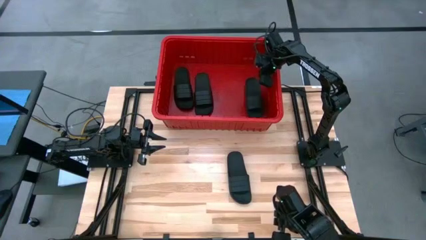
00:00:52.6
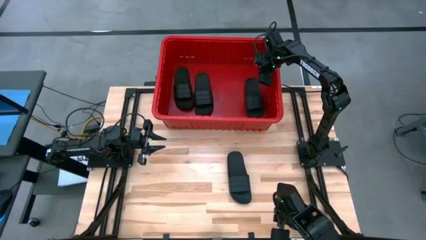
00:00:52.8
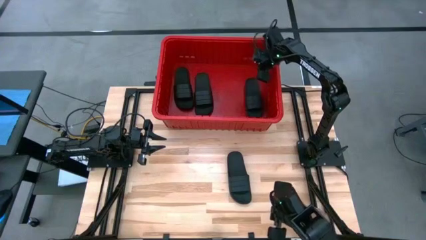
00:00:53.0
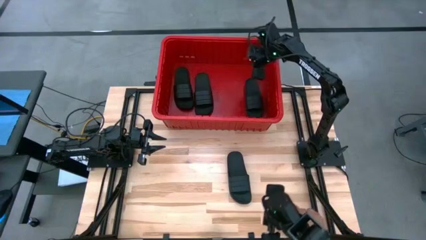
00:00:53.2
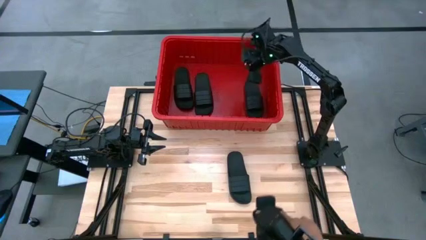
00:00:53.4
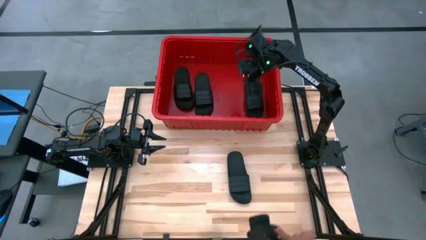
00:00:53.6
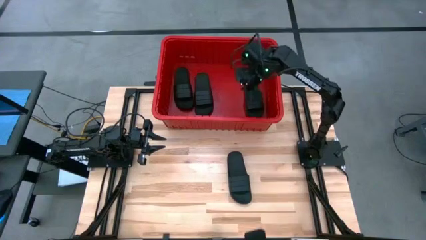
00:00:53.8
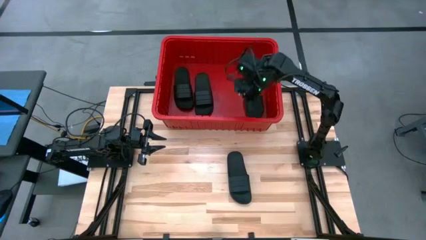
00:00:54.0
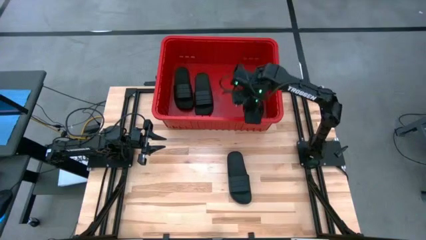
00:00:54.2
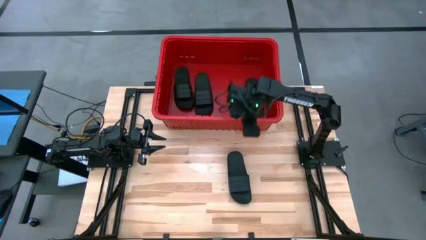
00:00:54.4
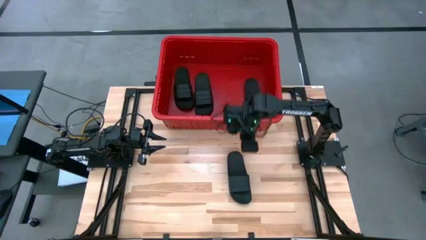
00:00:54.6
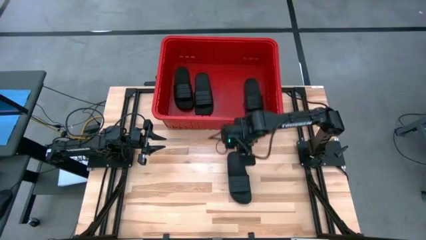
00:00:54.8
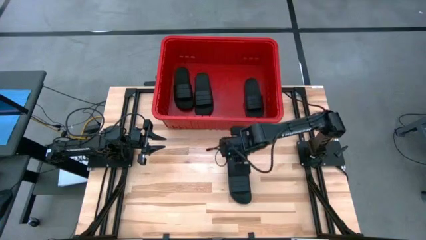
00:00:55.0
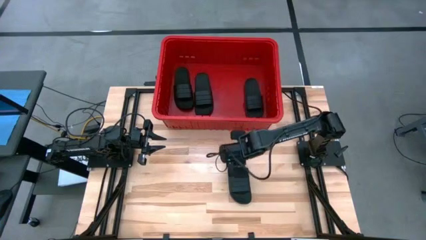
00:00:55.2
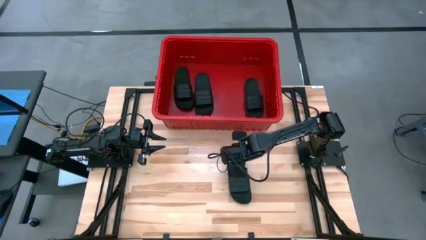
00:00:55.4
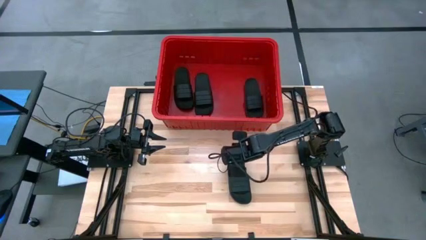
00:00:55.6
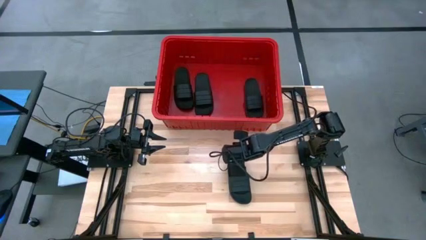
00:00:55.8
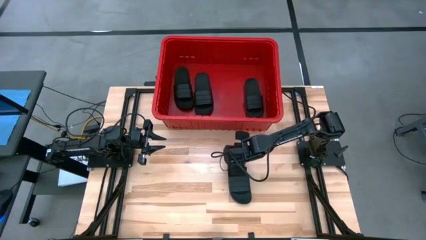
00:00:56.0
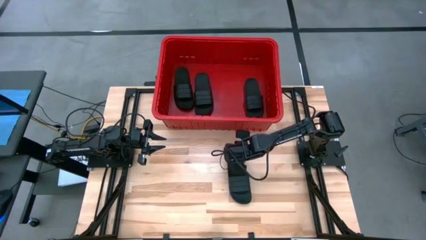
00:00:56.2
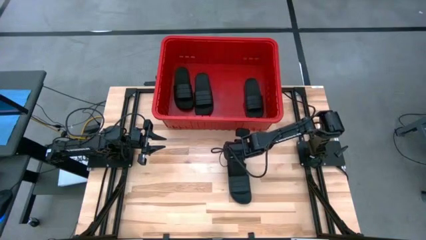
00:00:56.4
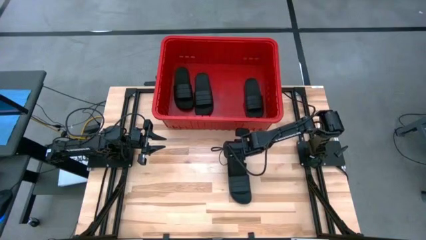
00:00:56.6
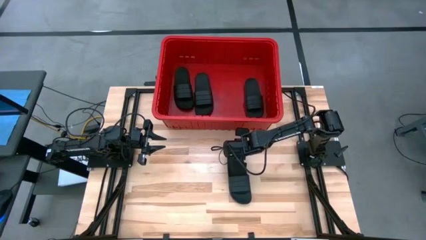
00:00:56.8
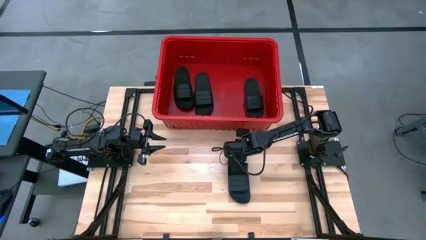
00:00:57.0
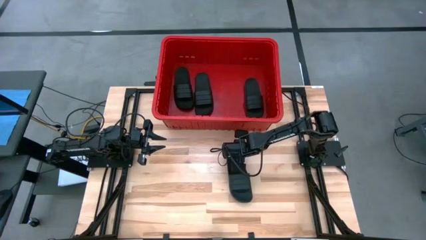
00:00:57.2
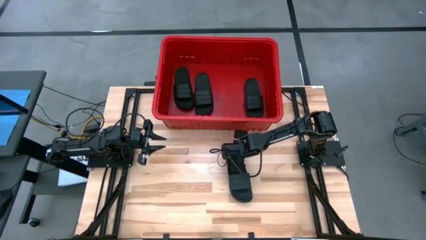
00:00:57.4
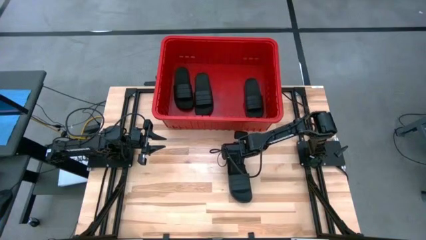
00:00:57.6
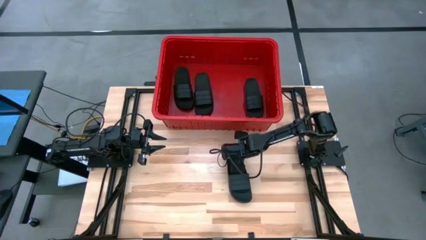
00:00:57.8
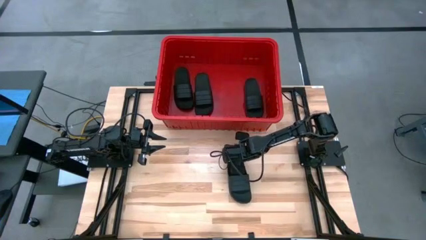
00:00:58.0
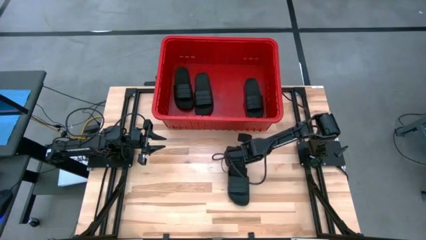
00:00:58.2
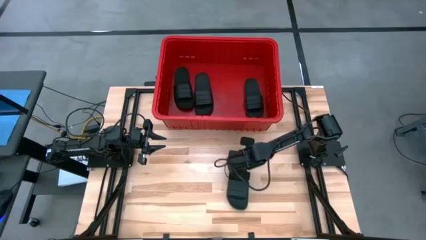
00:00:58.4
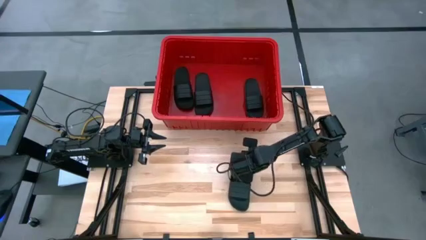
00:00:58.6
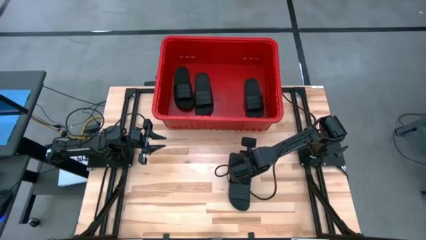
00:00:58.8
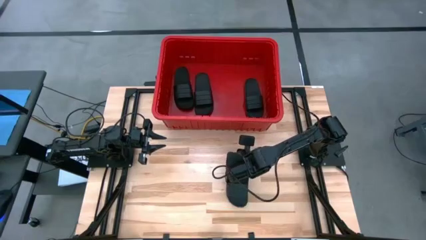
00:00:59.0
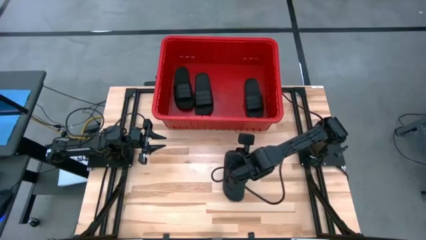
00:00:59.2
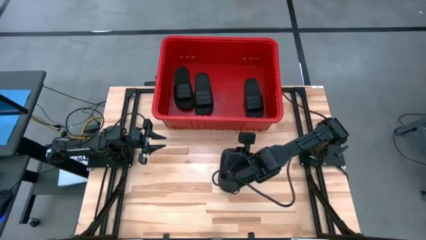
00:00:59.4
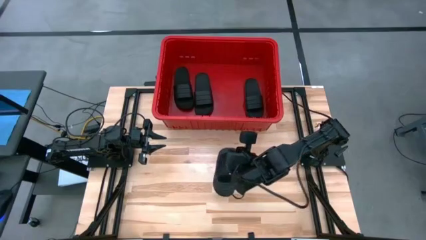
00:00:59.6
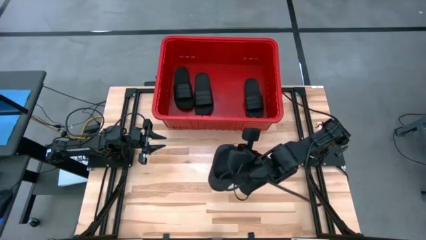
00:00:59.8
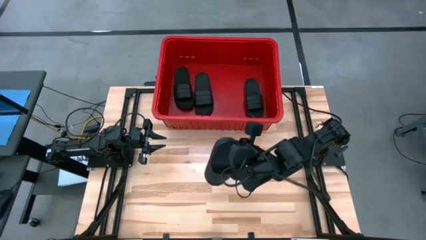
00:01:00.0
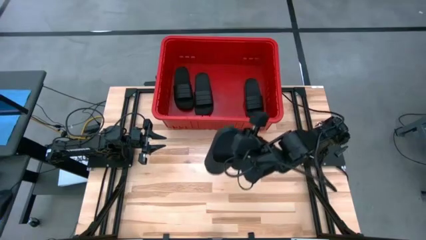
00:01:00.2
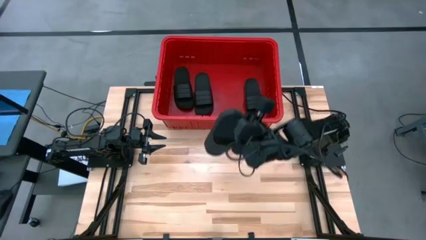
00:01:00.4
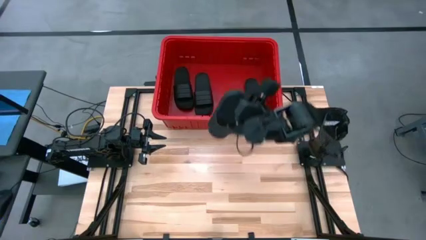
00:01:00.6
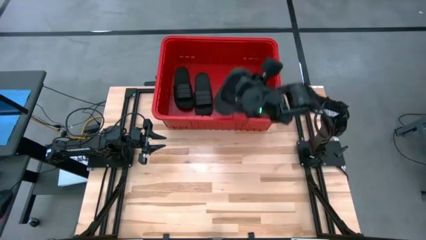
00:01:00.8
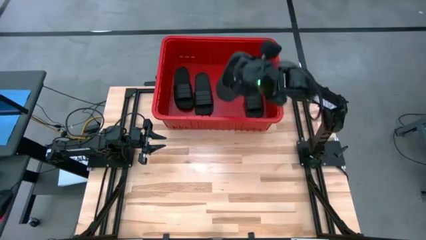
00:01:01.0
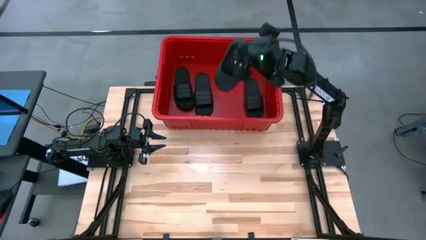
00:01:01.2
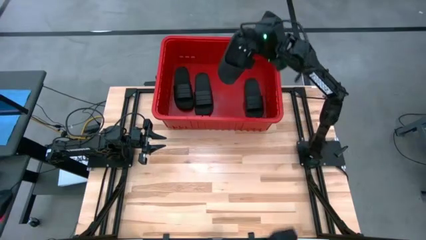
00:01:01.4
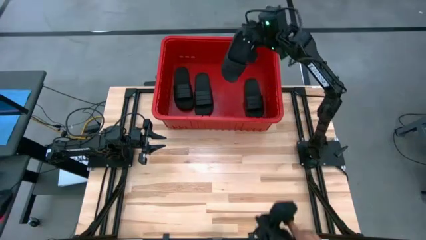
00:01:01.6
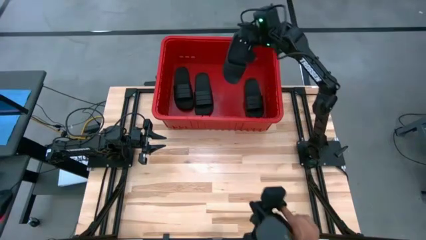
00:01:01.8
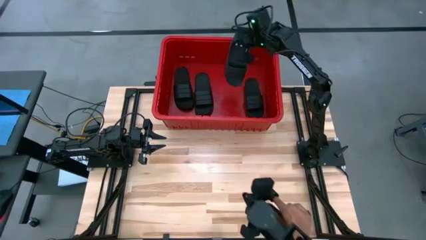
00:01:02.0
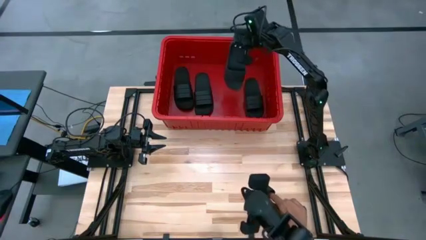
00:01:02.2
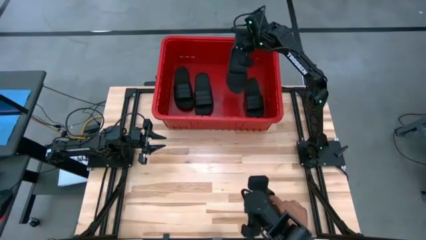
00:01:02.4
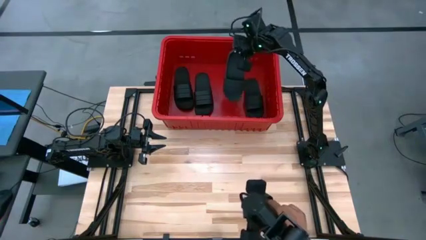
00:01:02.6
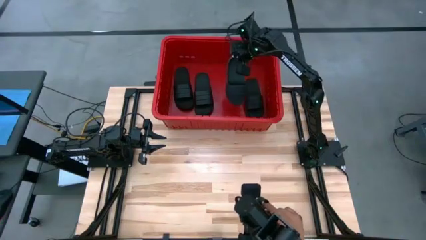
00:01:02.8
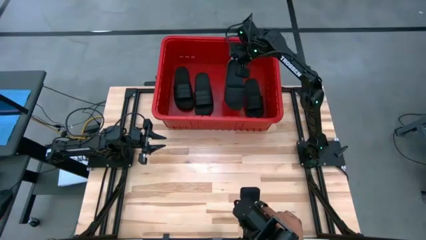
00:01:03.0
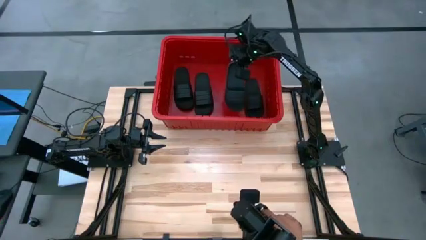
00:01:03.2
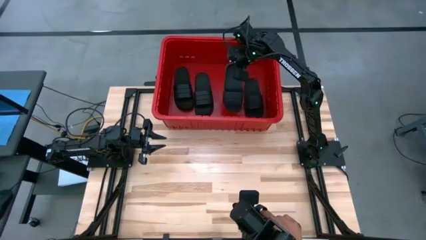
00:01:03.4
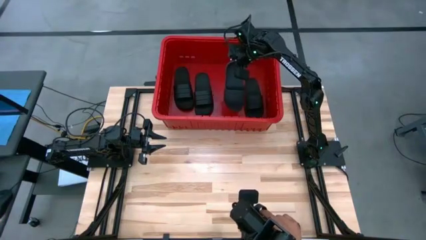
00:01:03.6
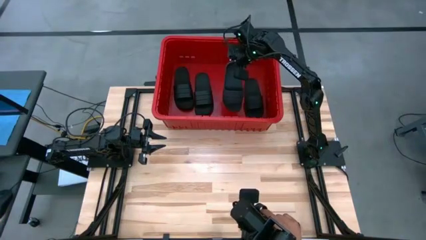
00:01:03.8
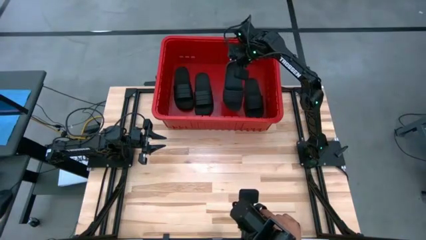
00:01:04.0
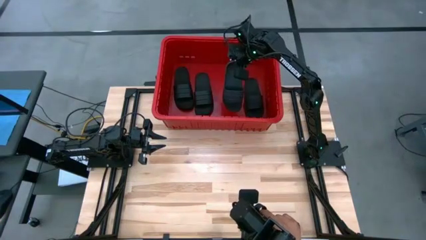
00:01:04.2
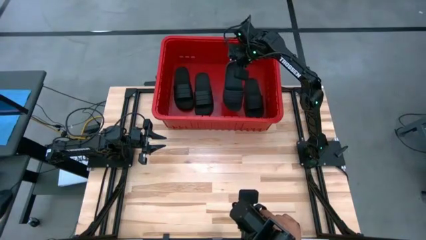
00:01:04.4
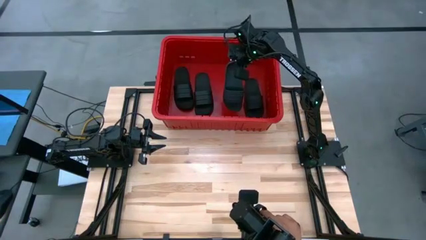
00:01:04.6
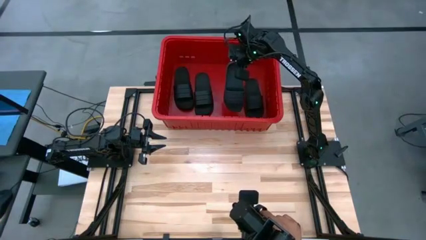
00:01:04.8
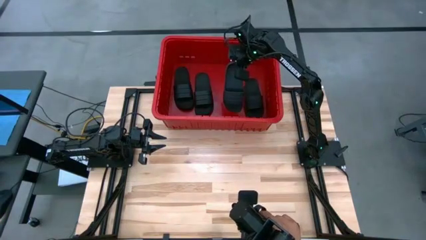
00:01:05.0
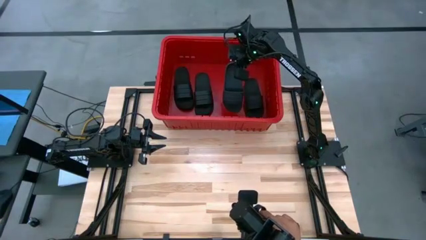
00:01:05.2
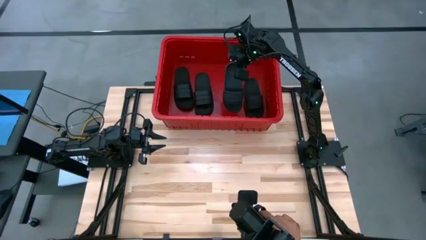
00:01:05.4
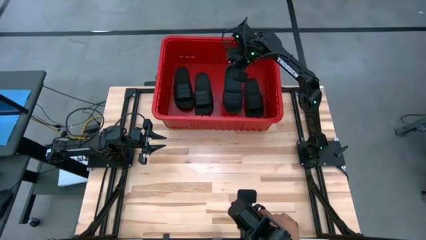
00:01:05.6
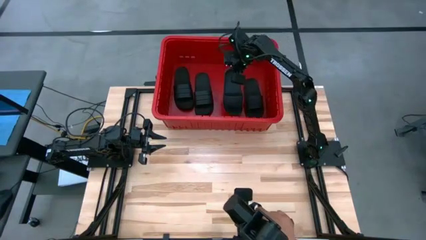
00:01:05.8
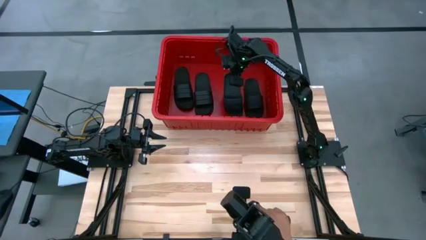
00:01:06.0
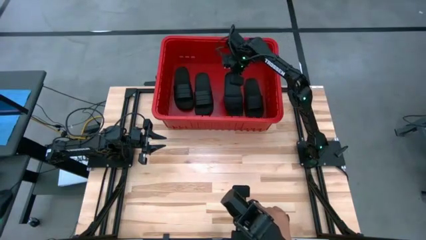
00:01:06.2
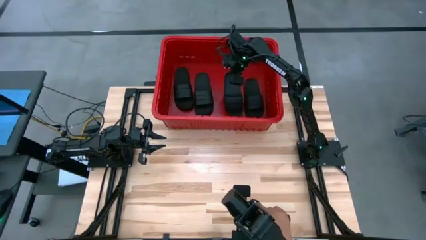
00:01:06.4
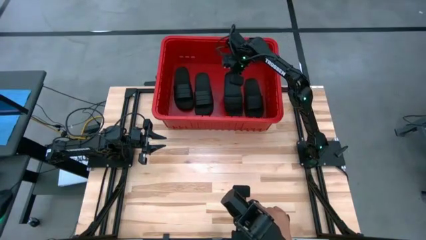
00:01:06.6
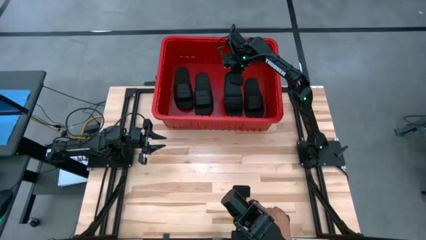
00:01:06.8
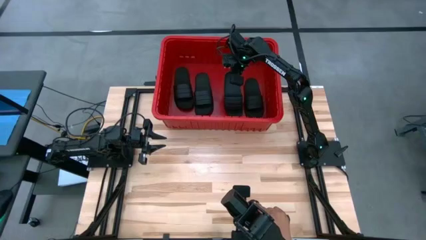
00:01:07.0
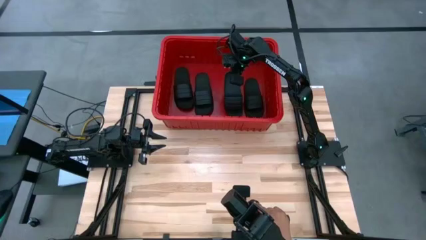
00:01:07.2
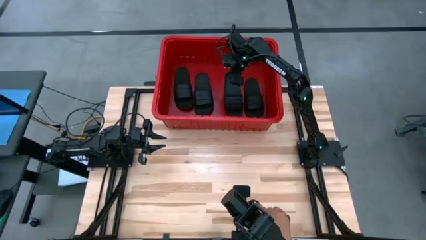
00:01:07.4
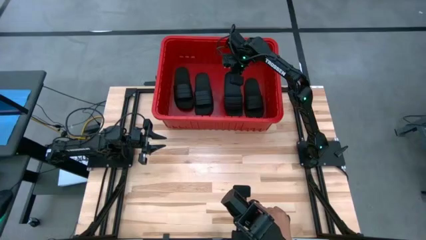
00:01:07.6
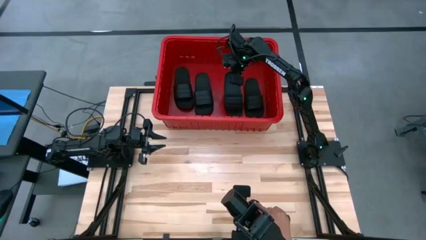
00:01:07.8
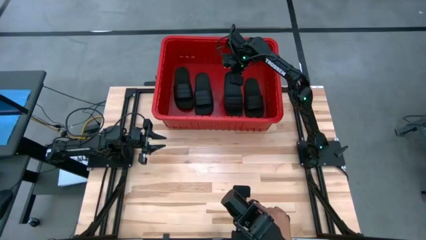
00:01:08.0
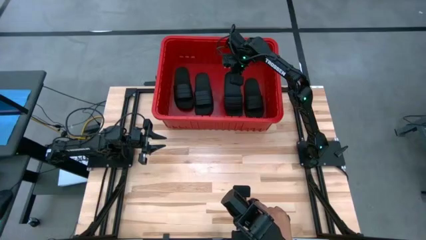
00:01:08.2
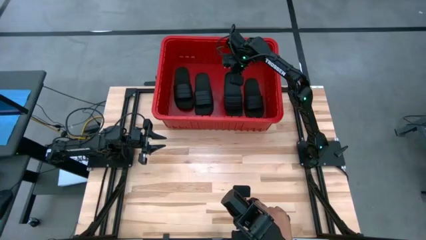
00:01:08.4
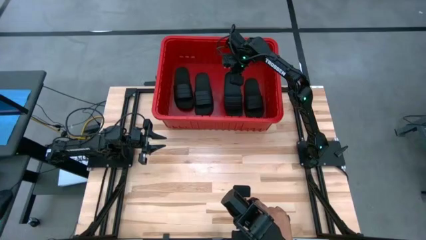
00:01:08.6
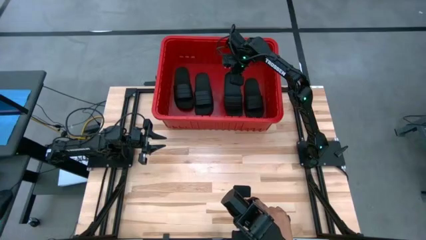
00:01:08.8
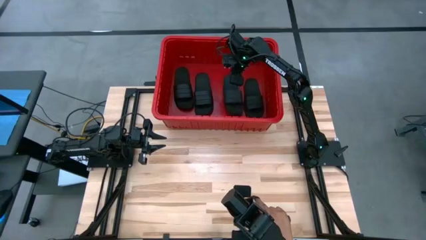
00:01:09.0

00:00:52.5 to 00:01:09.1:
Task: Pick and place slides into bin
Put the black slipper into the red container
